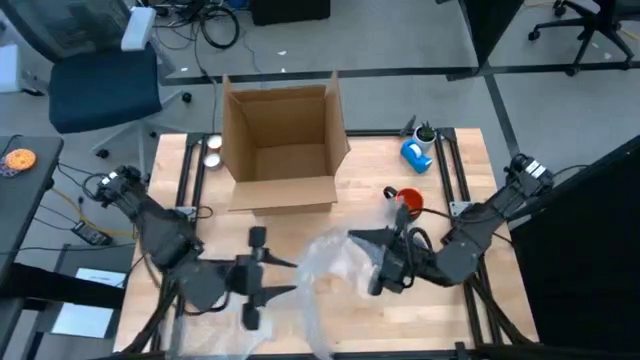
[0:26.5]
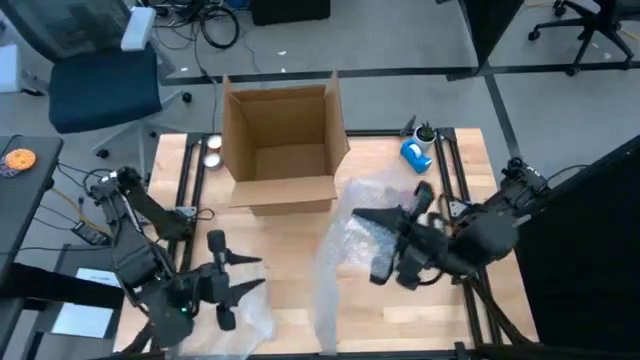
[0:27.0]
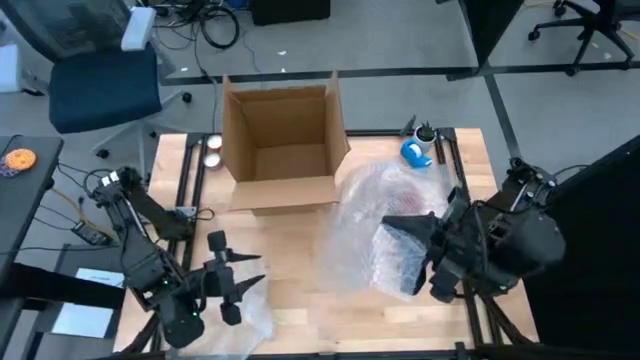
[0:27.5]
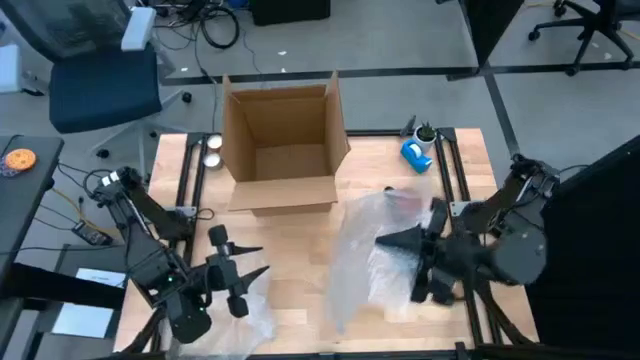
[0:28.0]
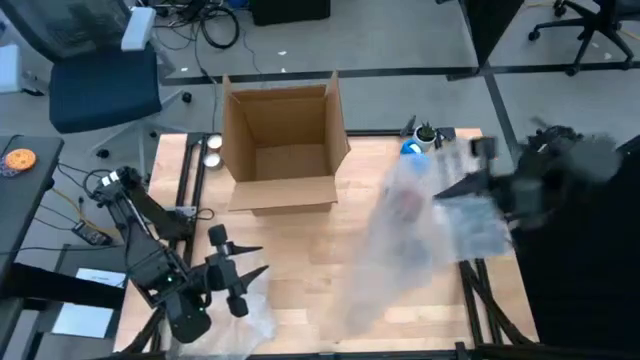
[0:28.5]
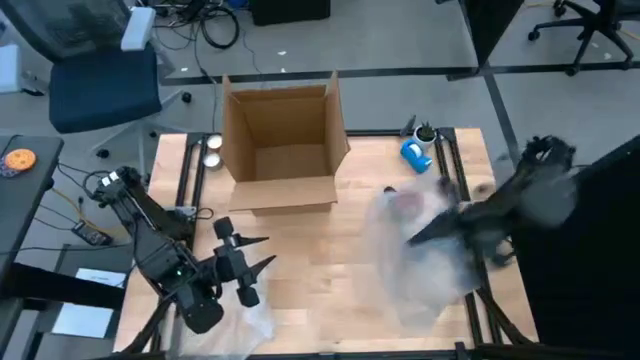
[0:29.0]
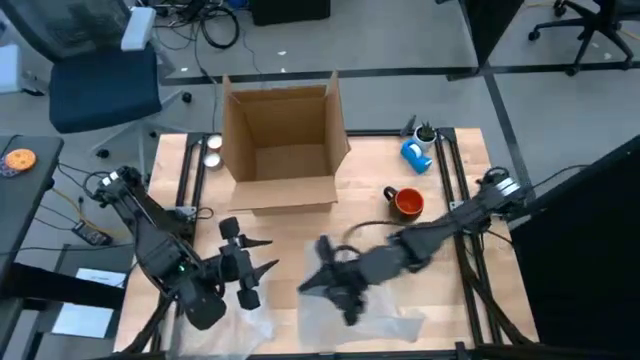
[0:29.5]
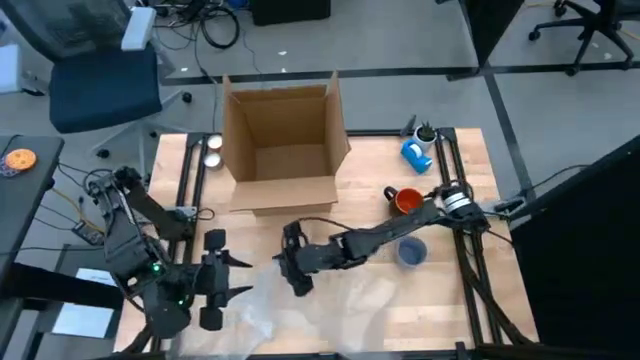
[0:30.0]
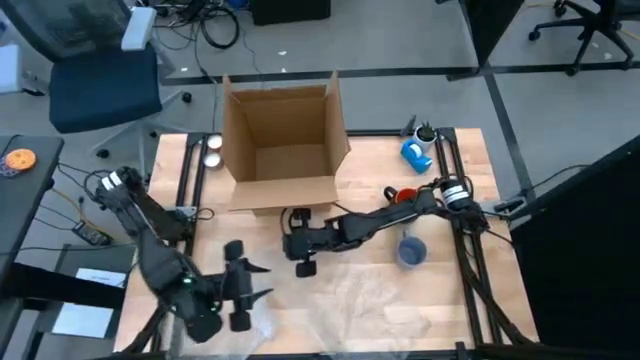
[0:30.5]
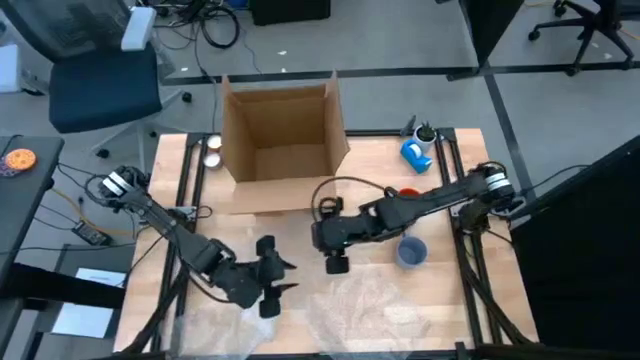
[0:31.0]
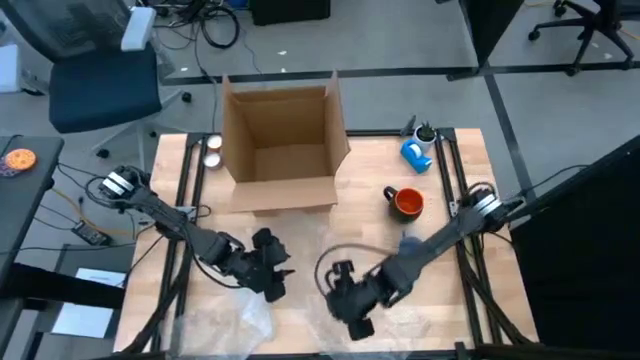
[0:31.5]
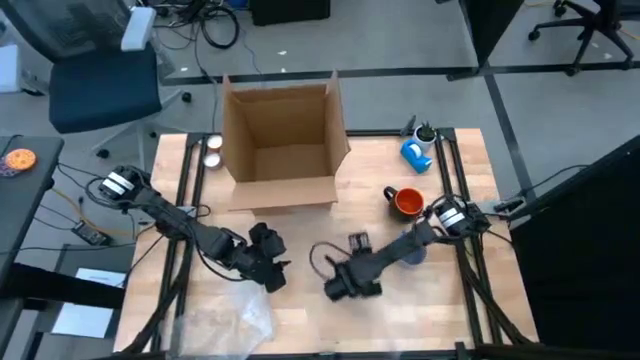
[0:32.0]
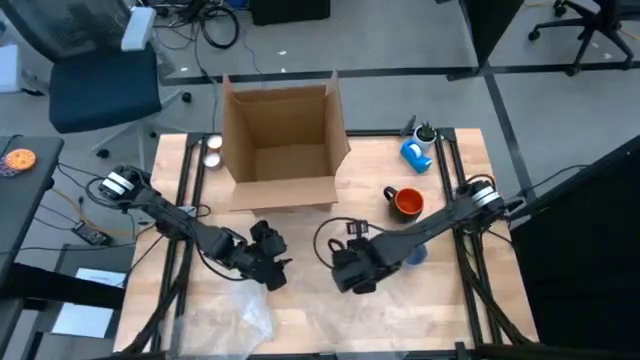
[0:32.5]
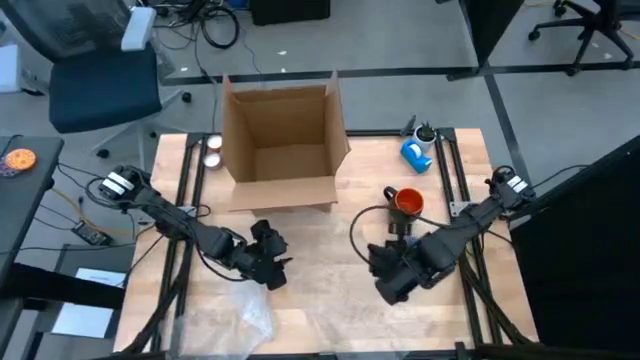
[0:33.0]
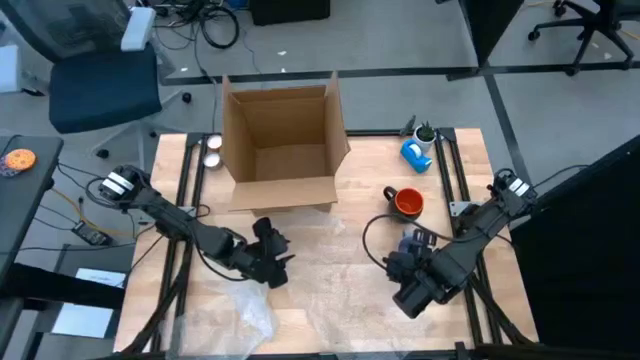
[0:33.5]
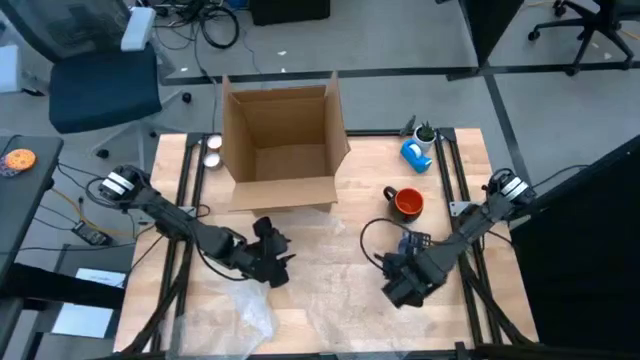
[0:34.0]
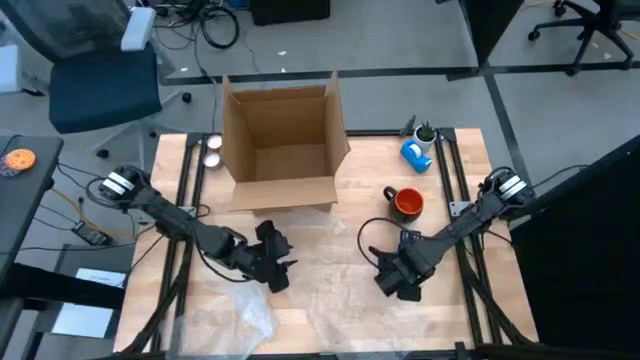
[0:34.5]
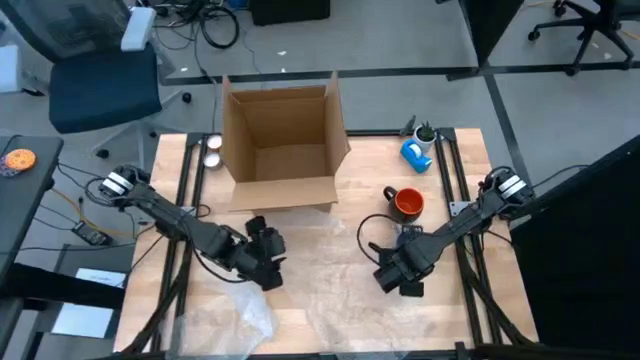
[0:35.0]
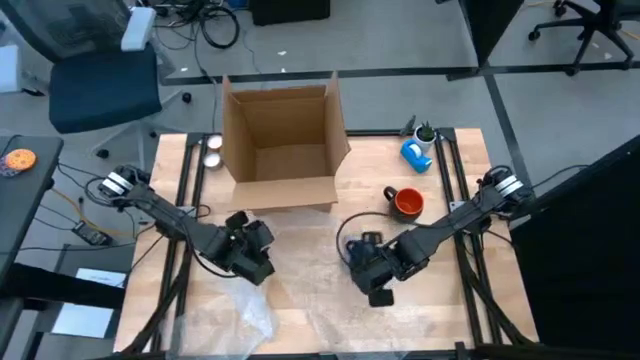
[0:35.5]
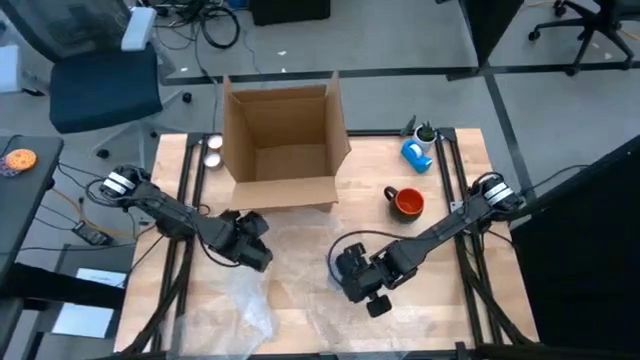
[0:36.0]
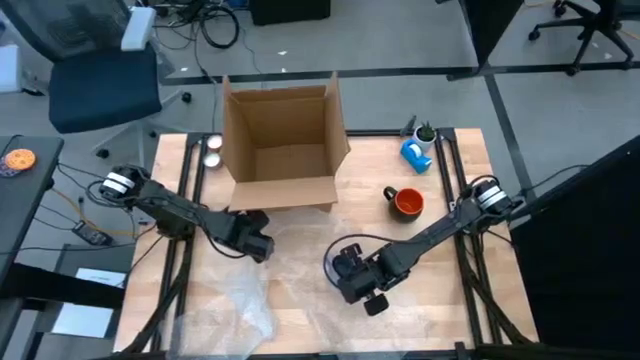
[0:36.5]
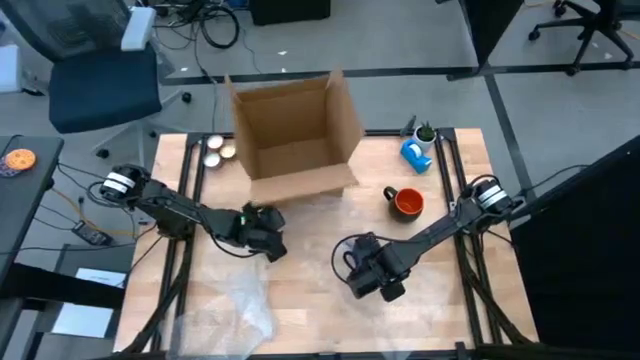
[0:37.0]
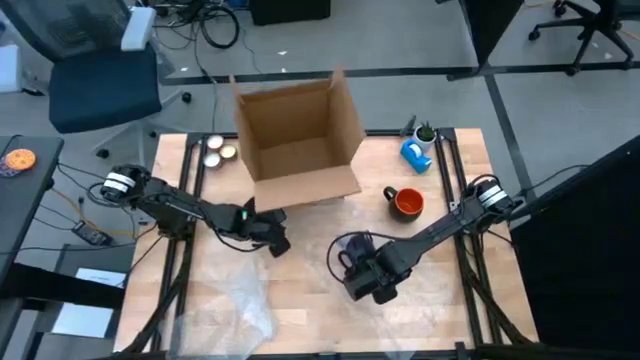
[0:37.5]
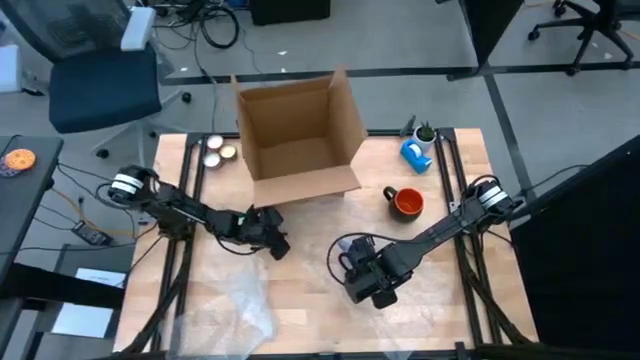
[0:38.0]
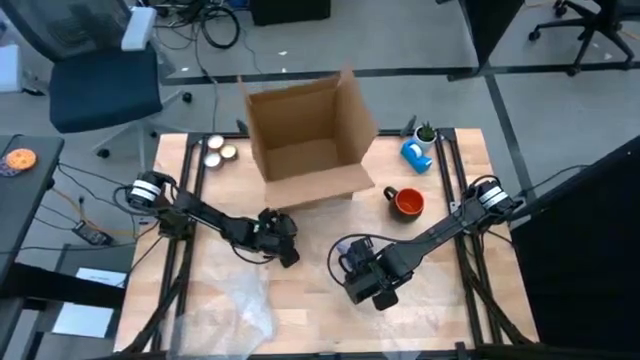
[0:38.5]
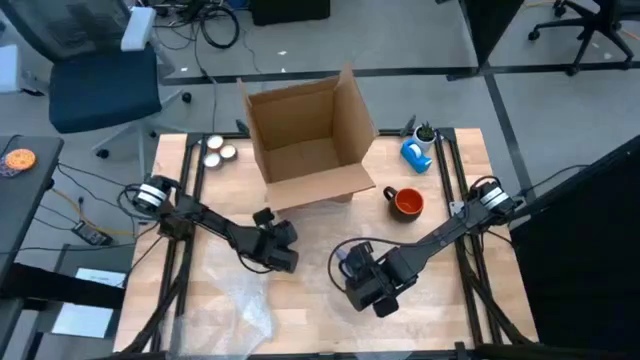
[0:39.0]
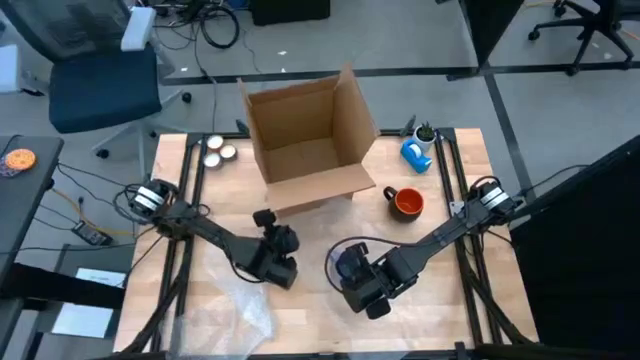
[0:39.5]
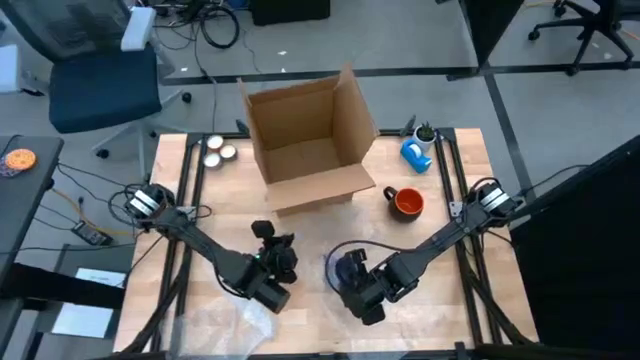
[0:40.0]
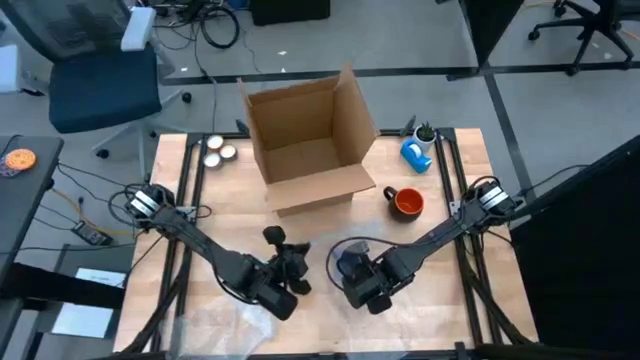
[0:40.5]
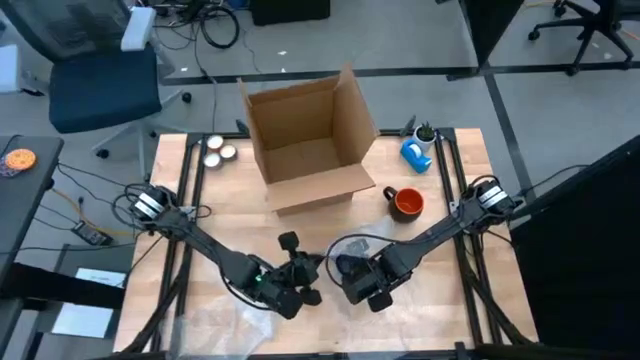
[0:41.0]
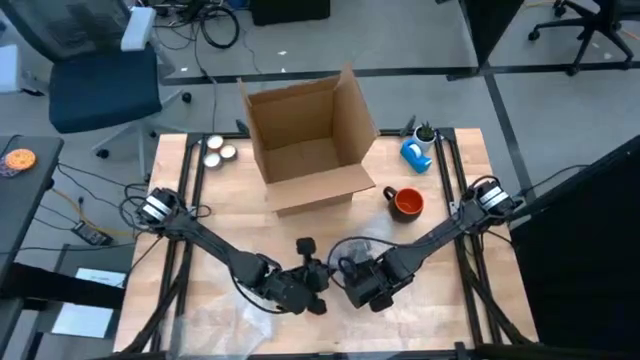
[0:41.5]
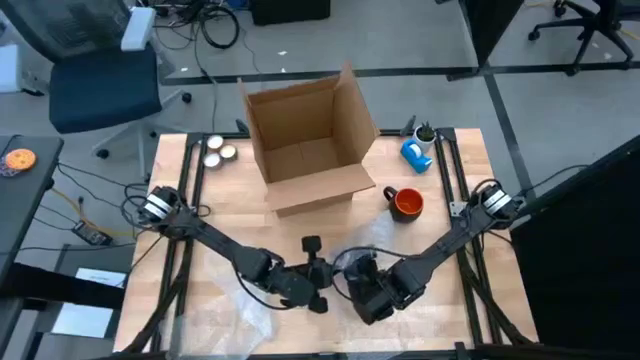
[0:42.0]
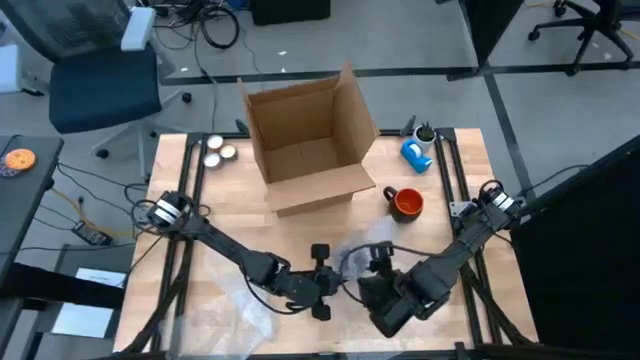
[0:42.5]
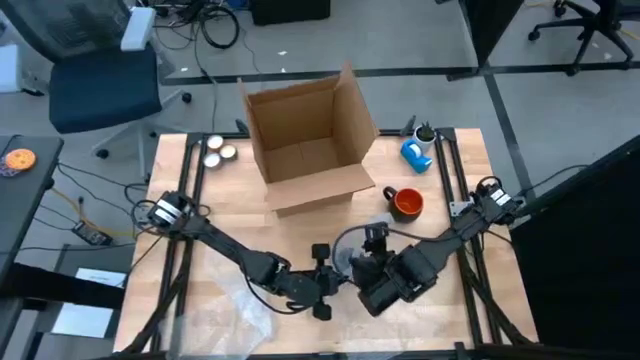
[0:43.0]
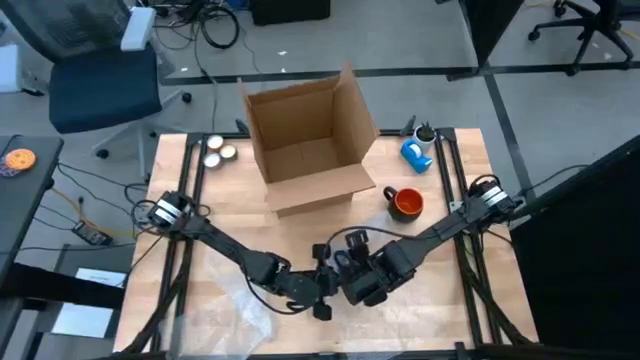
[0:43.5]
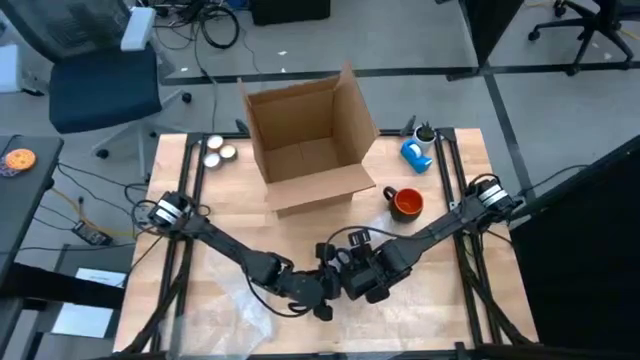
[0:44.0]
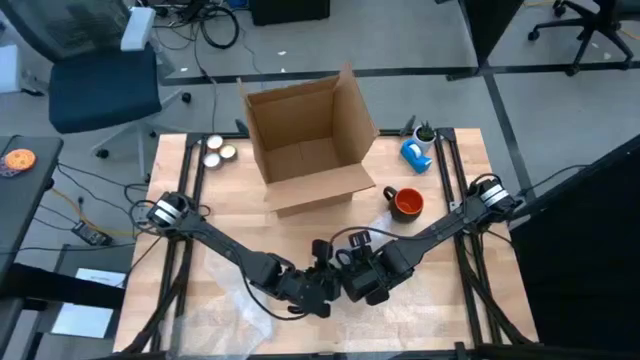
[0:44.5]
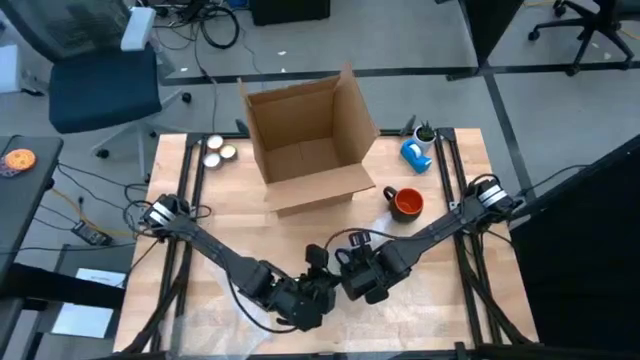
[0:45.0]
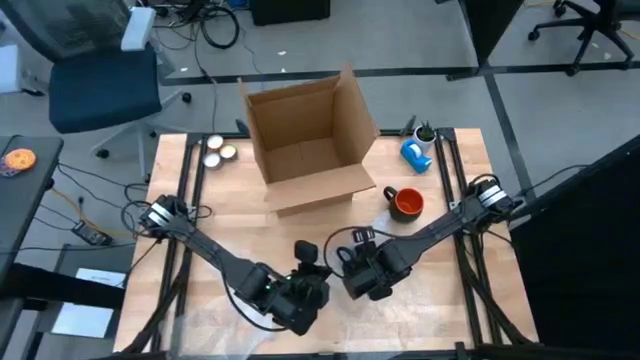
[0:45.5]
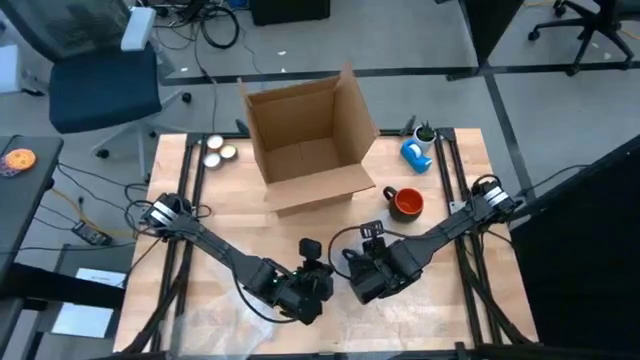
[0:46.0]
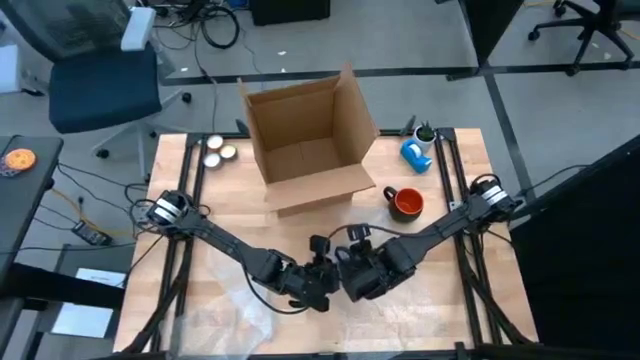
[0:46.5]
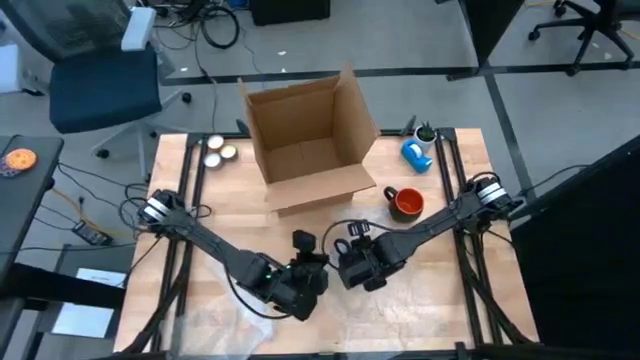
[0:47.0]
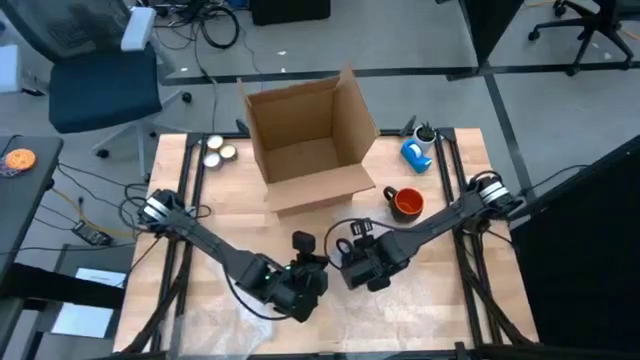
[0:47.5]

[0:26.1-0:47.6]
Task: wrap mug
Wrap the blue mug with the top bubble wrap
